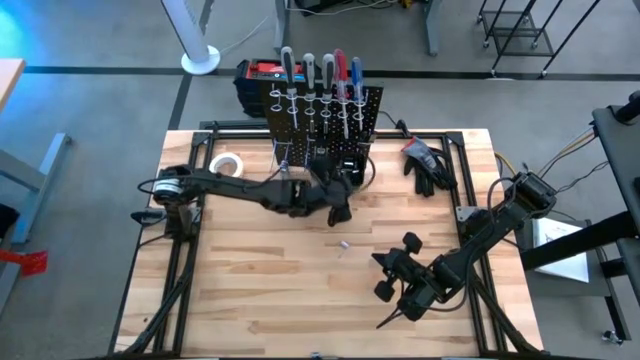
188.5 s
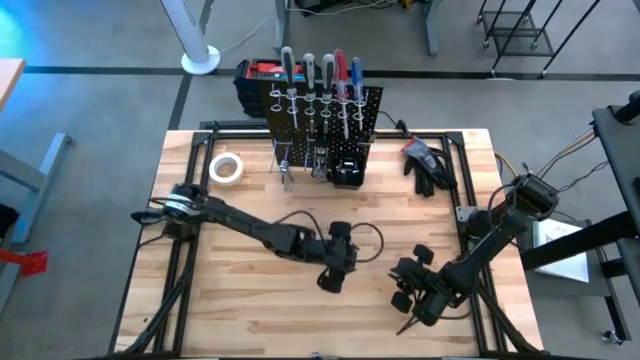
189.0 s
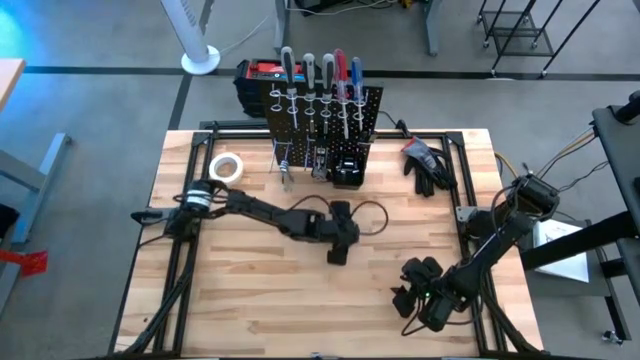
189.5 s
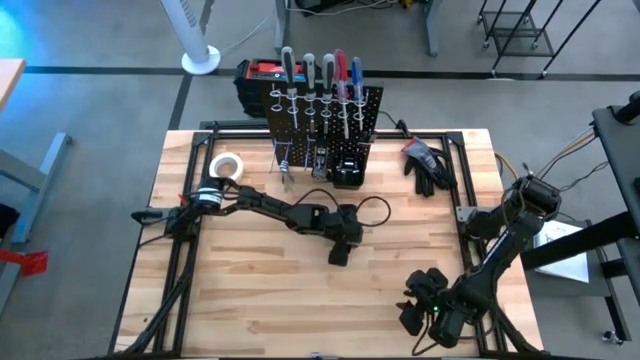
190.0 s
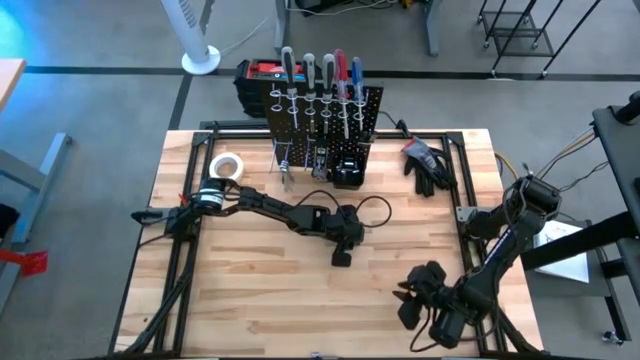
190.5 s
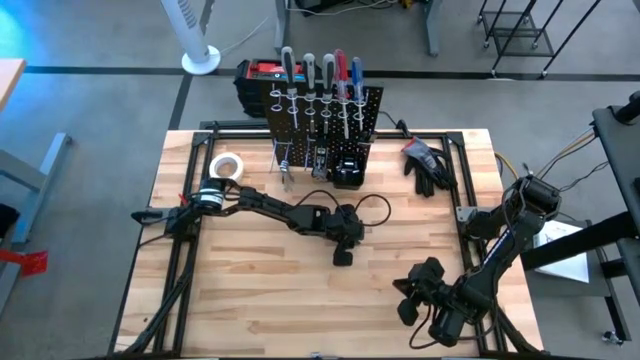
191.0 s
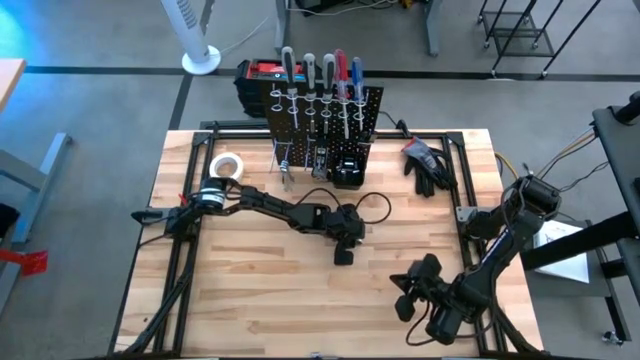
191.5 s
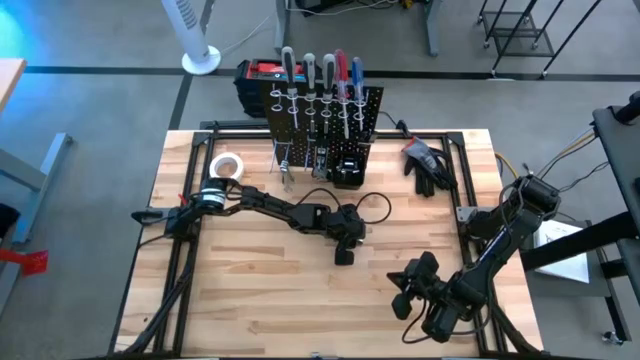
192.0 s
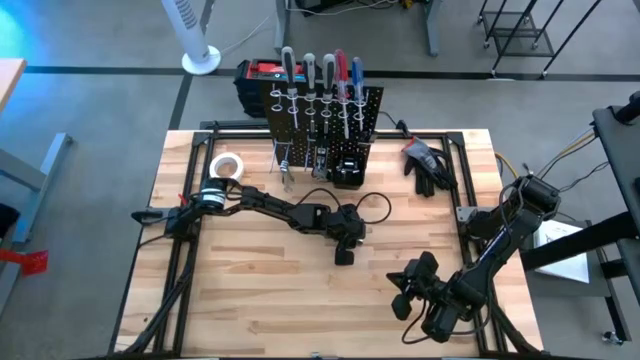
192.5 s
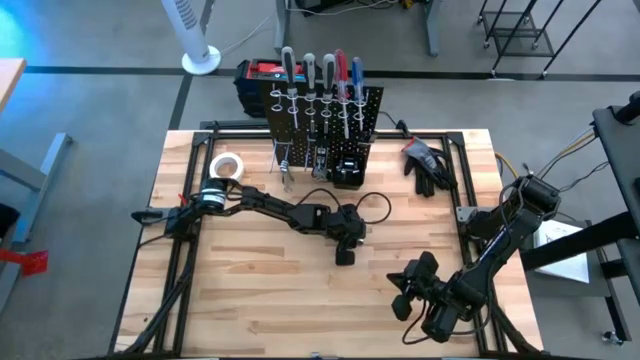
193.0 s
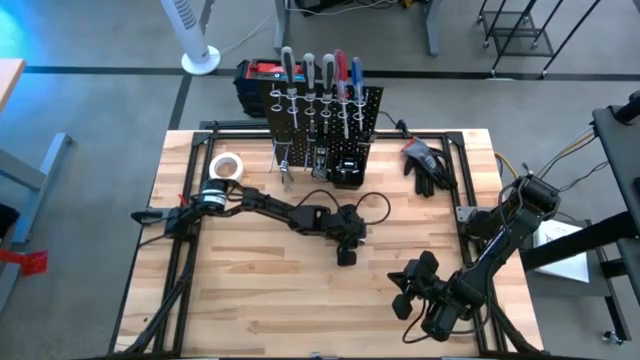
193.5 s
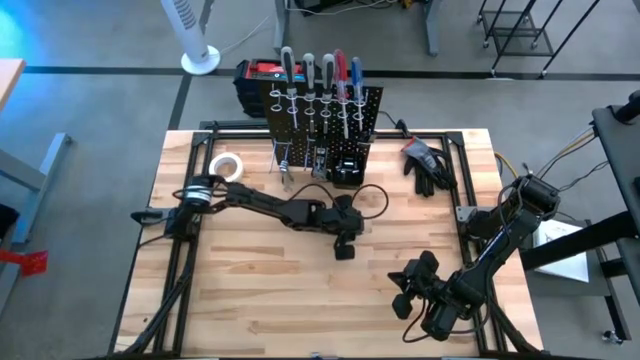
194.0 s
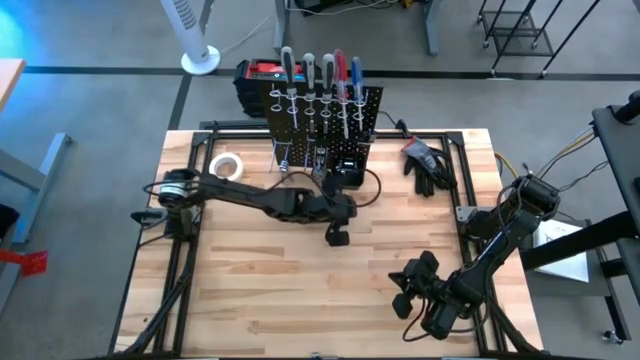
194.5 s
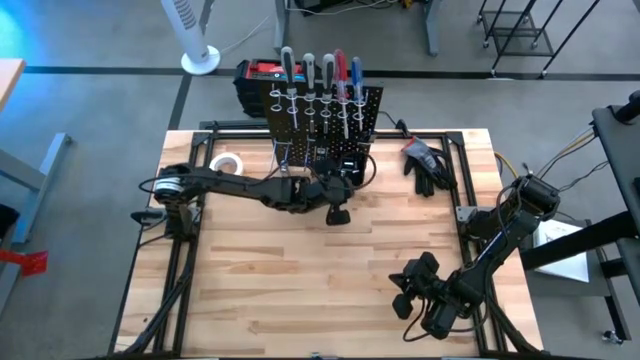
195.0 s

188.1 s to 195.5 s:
Task: Hang tools onto peg board
Put the socket wrench into the bin on the peg board

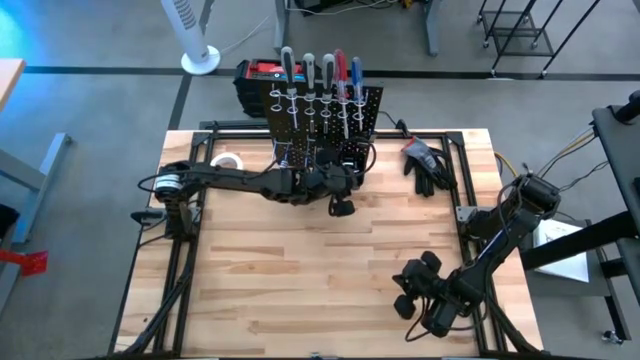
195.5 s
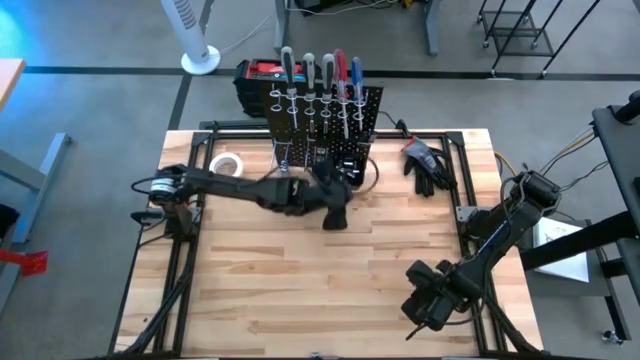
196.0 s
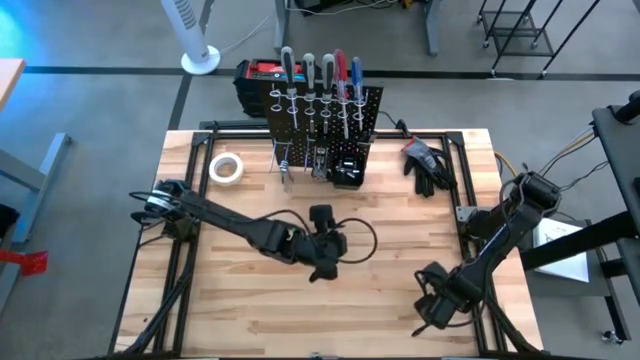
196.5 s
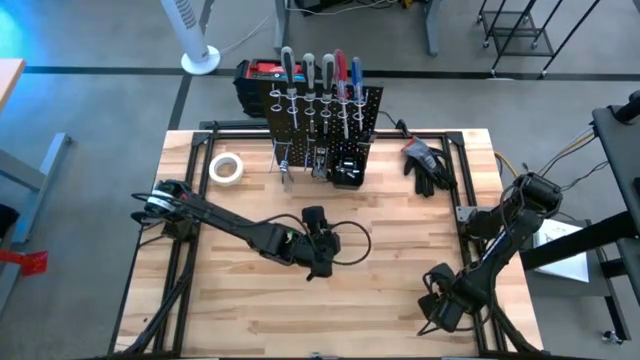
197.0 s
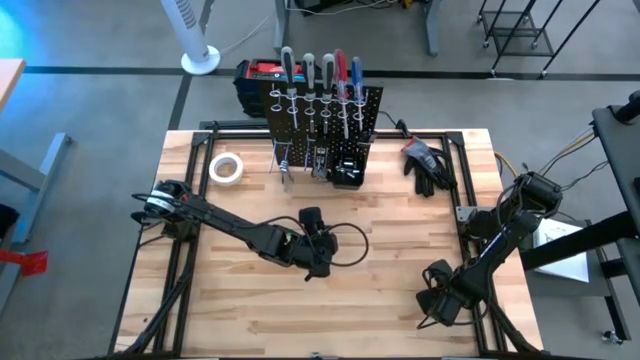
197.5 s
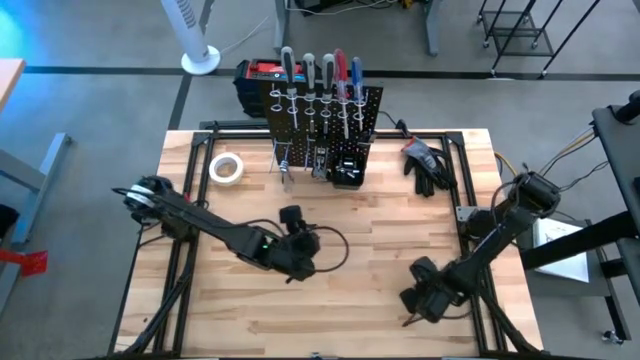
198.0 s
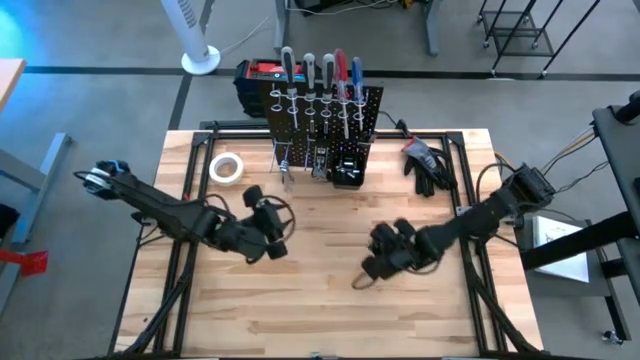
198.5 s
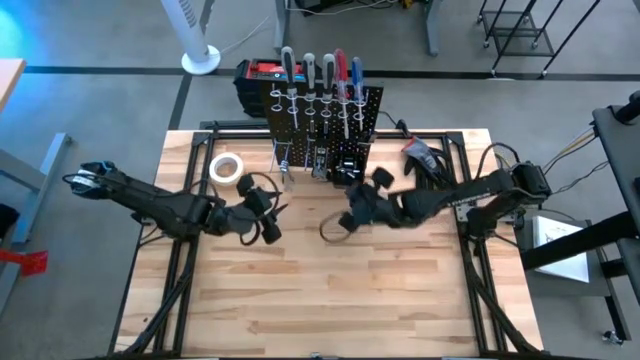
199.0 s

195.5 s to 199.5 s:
Put the socket wrench into the bin on the peg board

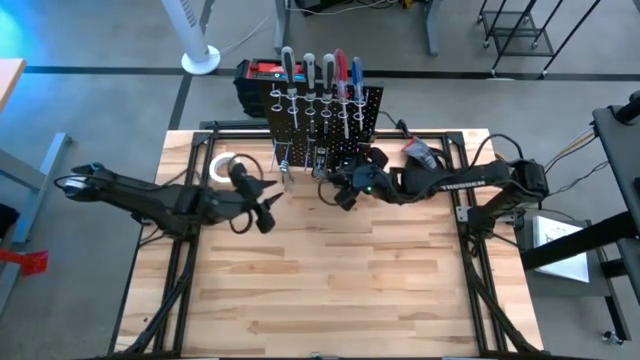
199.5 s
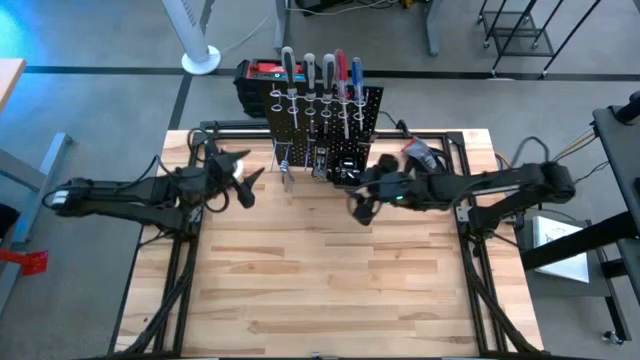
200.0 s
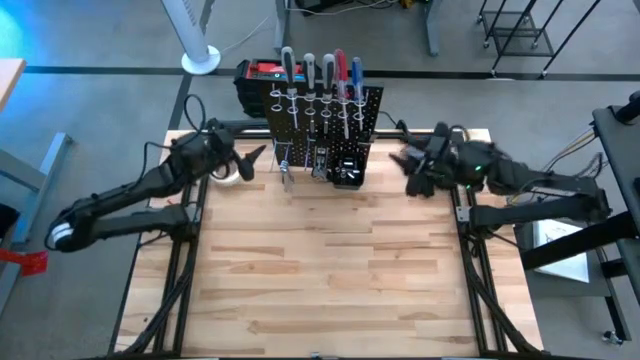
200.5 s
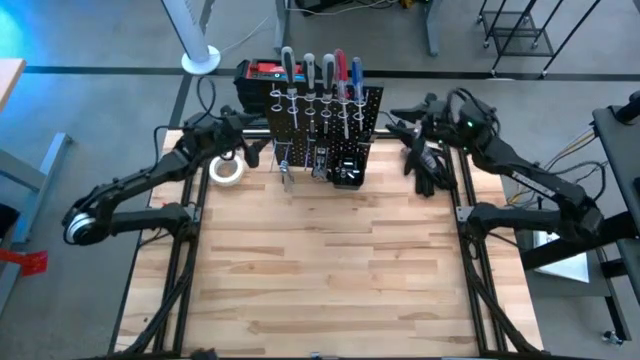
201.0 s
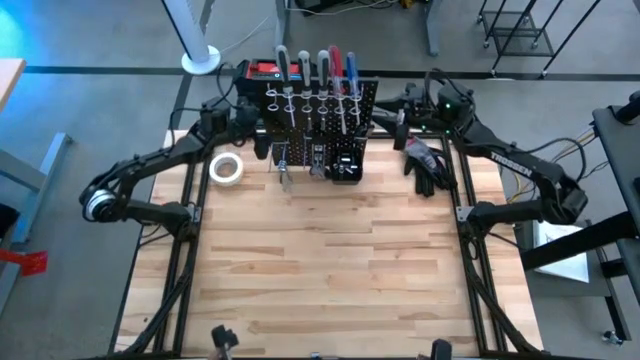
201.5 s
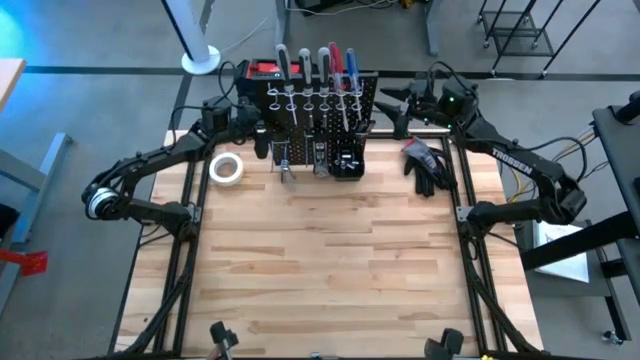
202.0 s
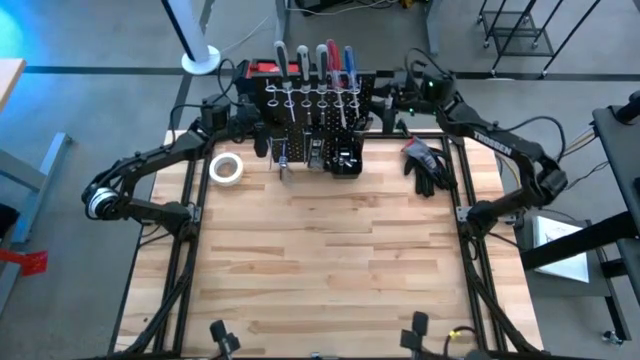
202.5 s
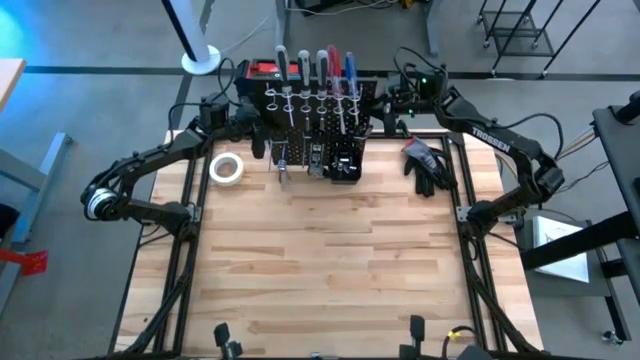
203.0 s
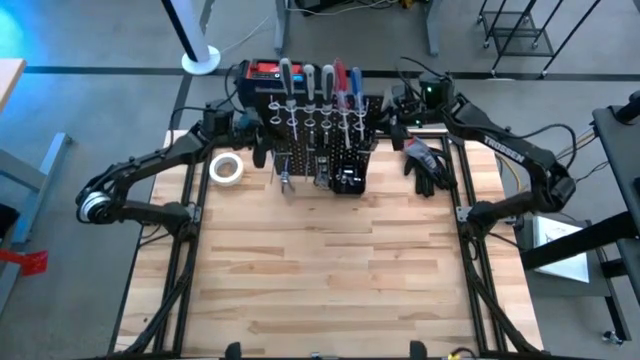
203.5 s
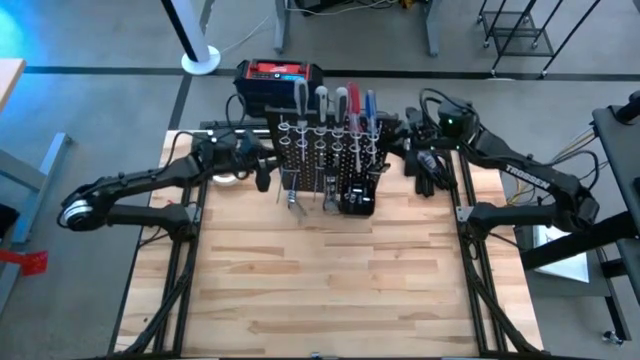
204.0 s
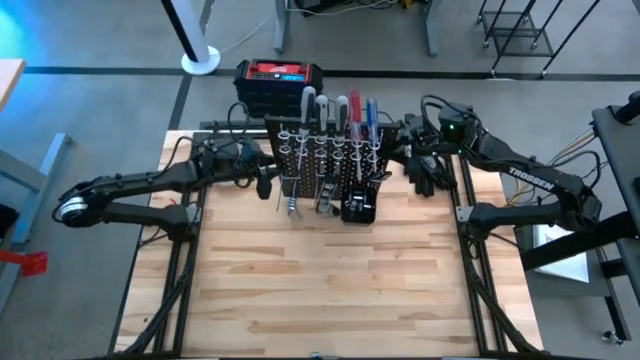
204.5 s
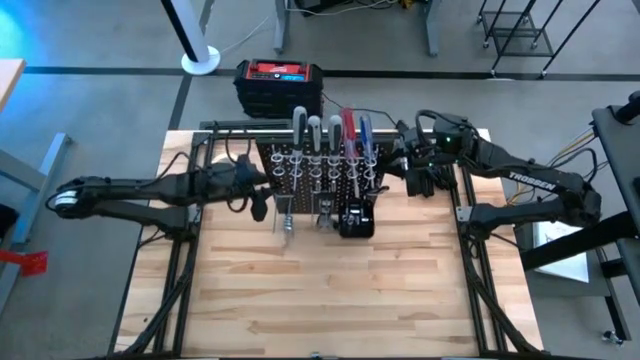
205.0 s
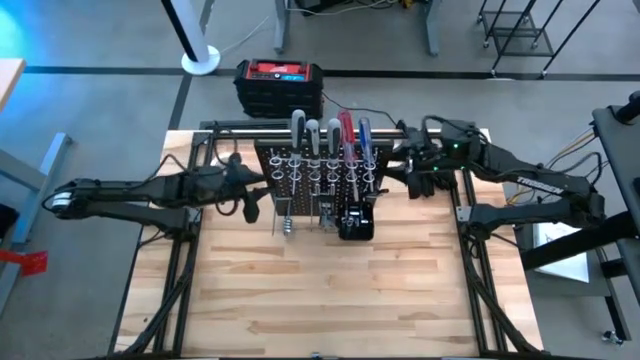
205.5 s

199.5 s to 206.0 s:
Move the peg board to the center of the table

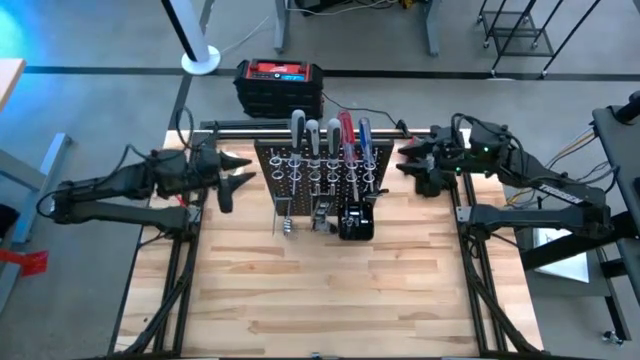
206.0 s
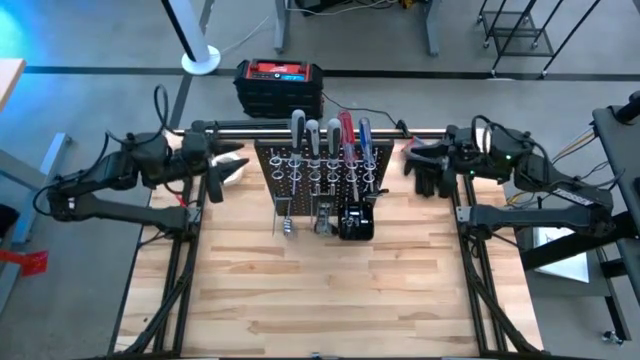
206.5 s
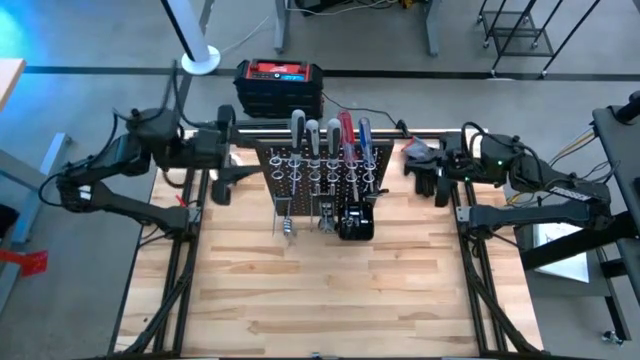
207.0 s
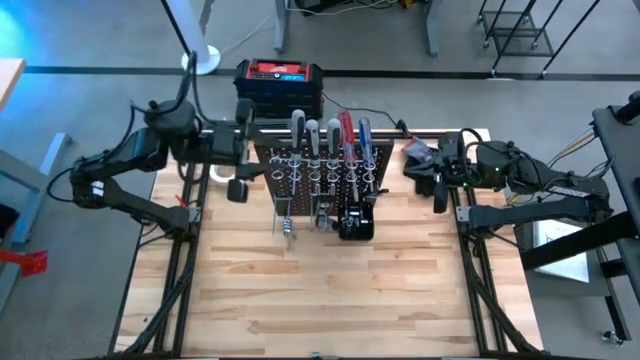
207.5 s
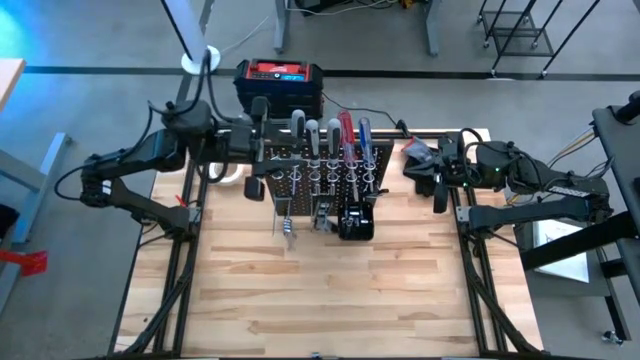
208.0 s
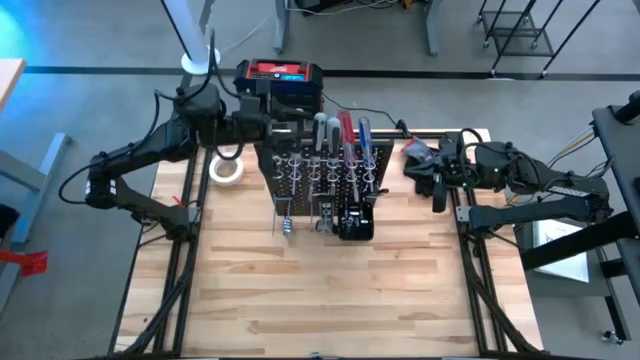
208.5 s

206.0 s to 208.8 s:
Adjust the bit driver handle

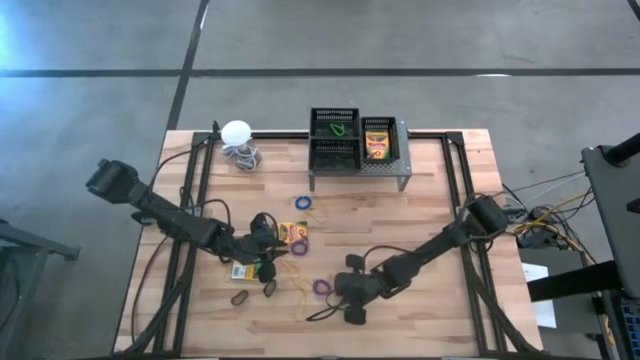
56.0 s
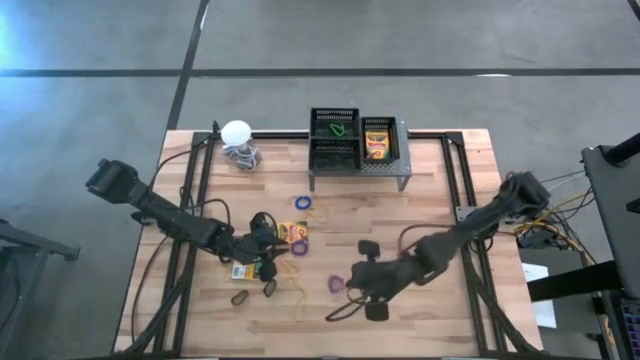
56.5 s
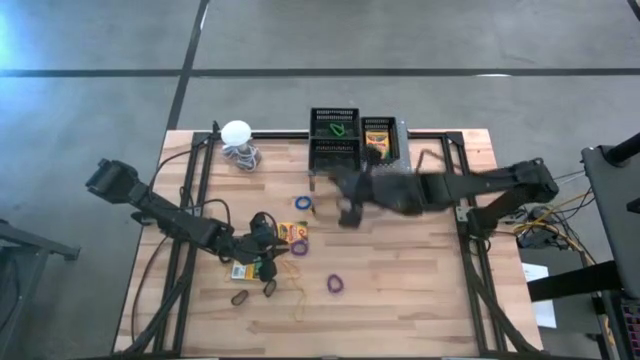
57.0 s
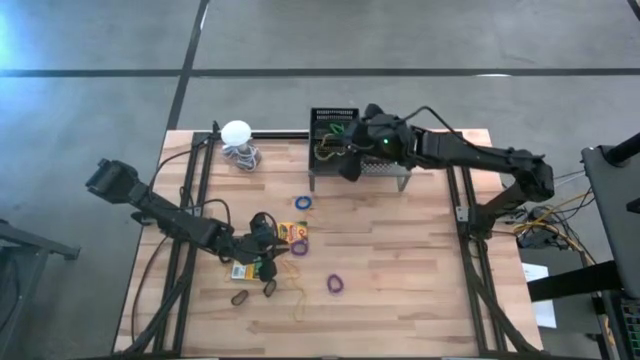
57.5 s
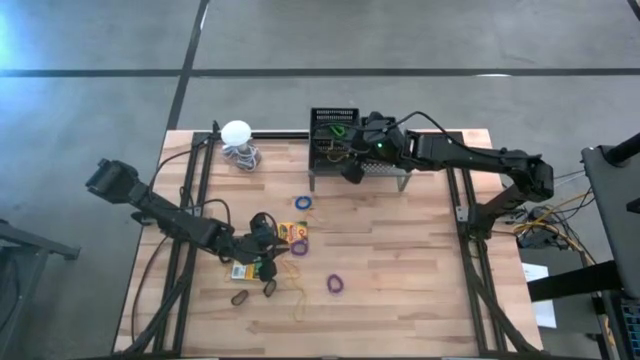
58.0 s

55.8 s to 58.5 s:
Task: Pick & Place Office Desk Supplies
Put the yellow rubber band into the bottom left black bin
